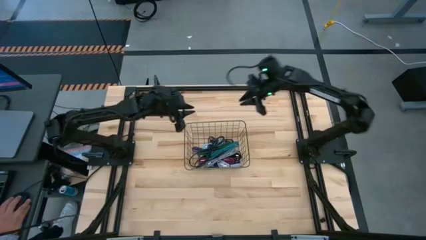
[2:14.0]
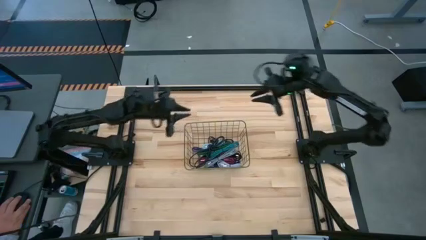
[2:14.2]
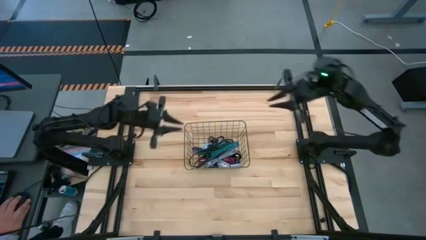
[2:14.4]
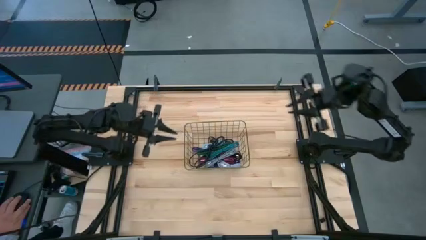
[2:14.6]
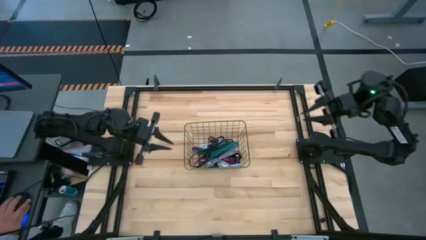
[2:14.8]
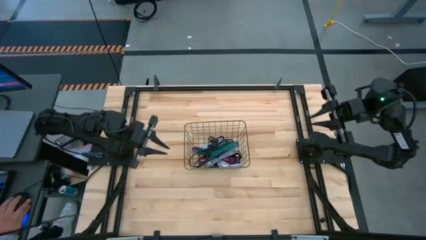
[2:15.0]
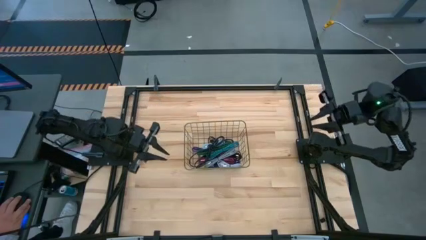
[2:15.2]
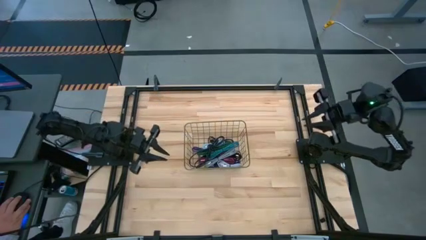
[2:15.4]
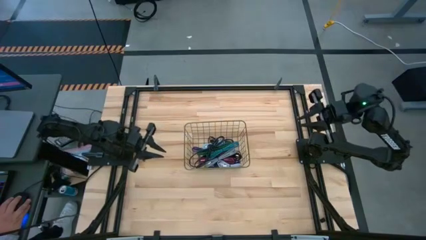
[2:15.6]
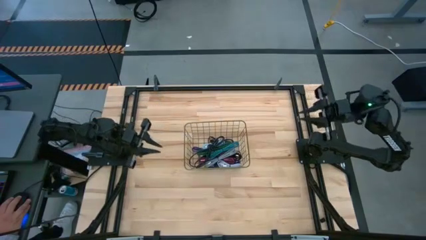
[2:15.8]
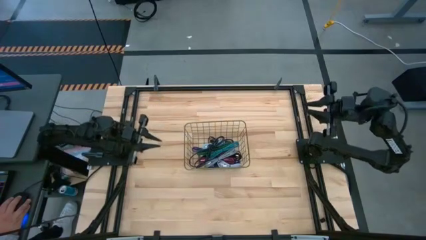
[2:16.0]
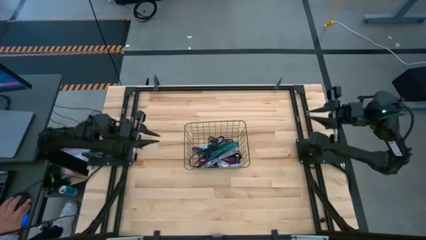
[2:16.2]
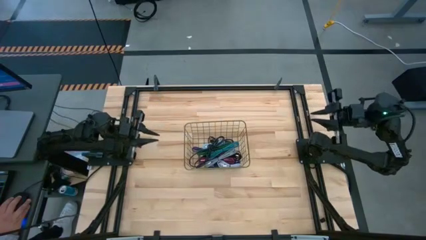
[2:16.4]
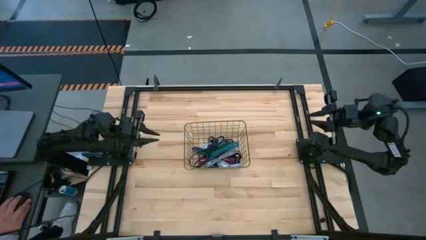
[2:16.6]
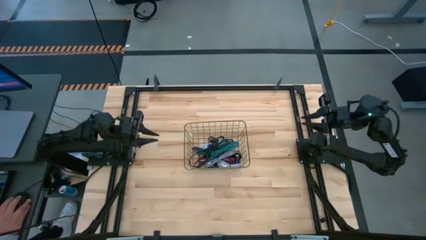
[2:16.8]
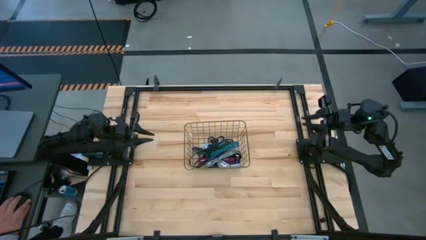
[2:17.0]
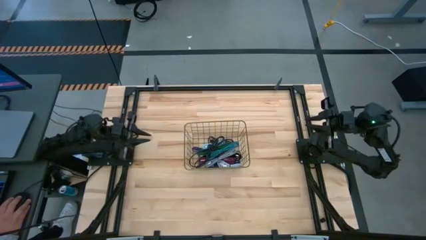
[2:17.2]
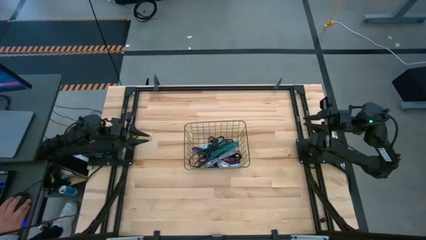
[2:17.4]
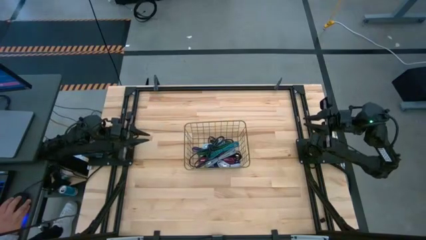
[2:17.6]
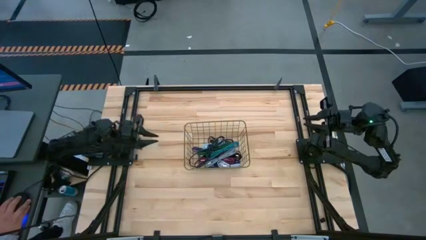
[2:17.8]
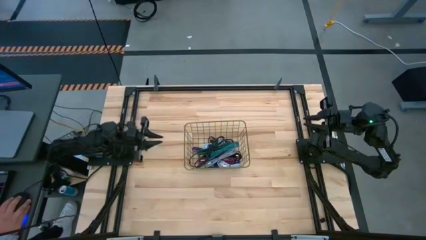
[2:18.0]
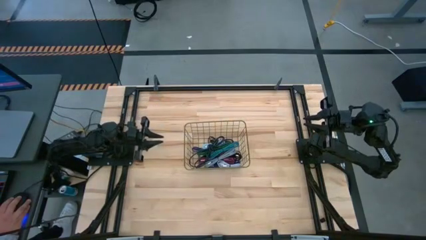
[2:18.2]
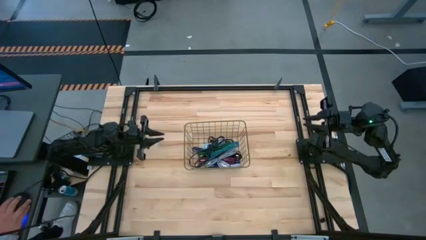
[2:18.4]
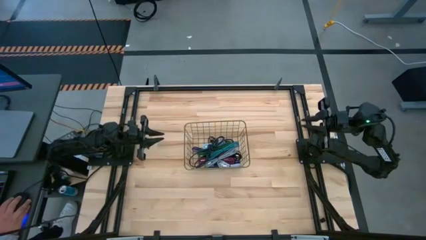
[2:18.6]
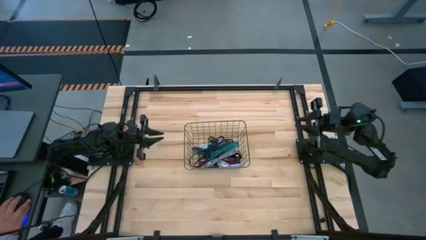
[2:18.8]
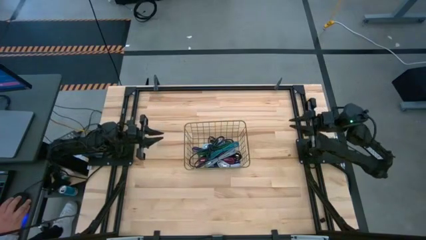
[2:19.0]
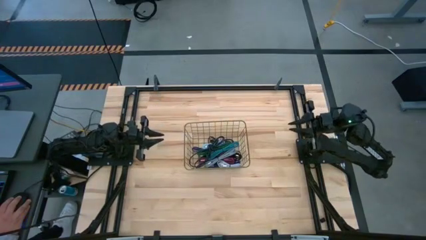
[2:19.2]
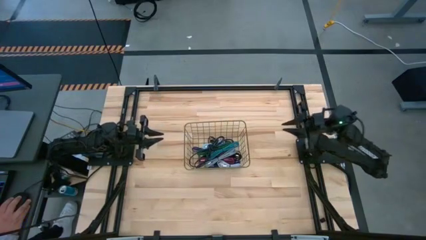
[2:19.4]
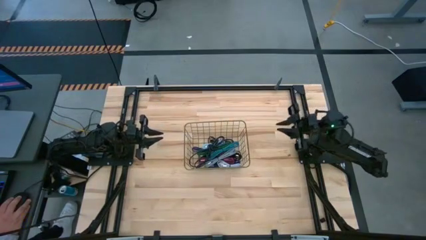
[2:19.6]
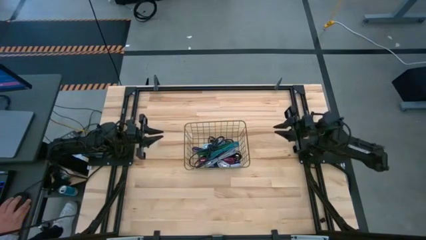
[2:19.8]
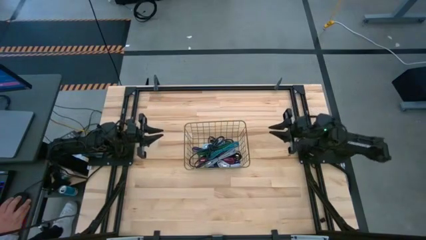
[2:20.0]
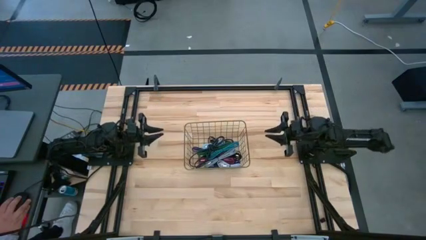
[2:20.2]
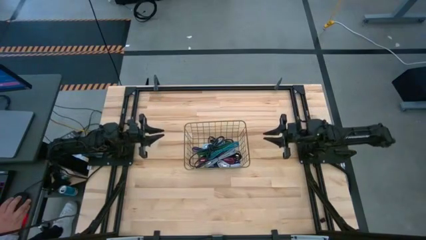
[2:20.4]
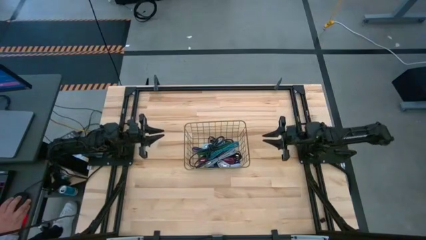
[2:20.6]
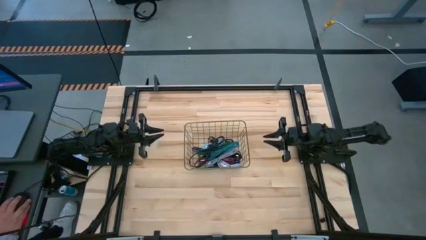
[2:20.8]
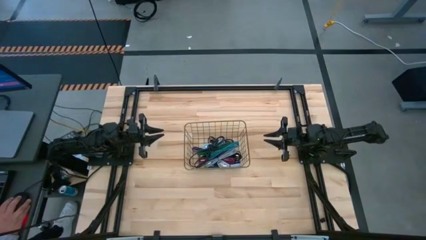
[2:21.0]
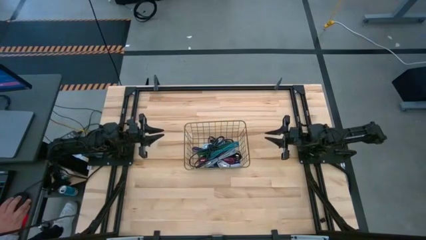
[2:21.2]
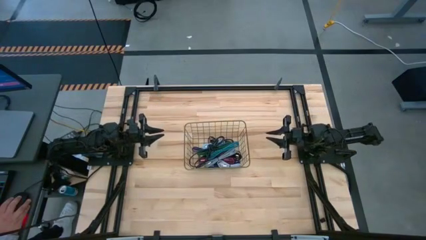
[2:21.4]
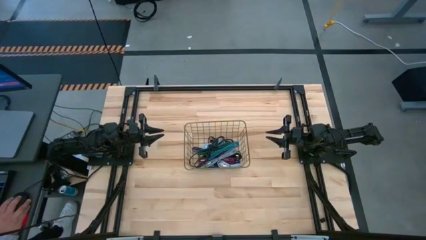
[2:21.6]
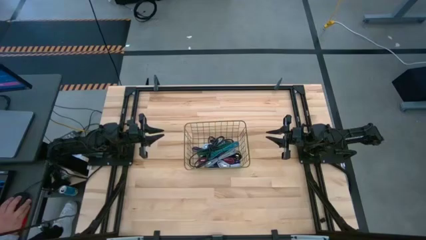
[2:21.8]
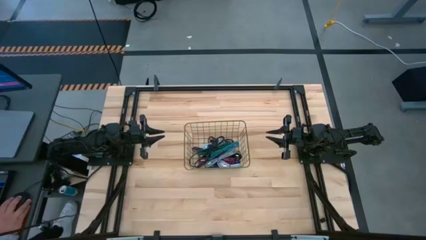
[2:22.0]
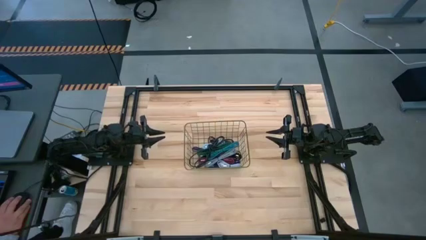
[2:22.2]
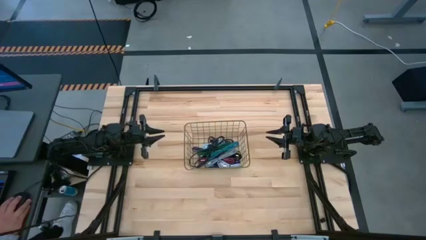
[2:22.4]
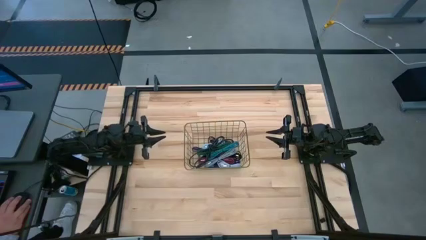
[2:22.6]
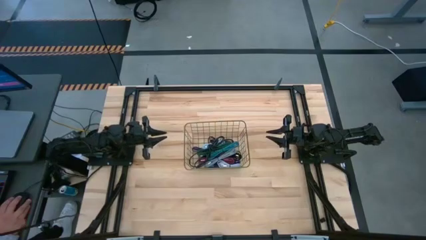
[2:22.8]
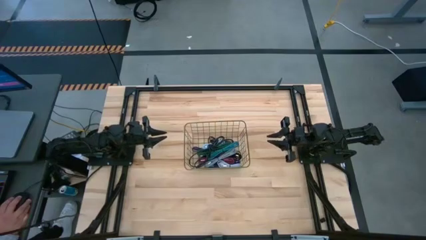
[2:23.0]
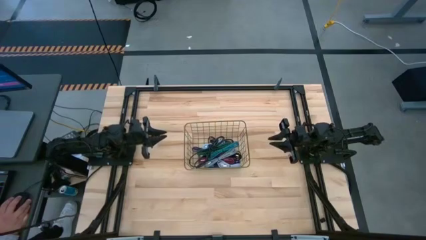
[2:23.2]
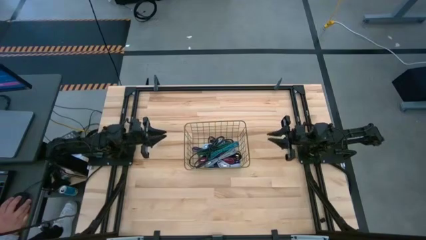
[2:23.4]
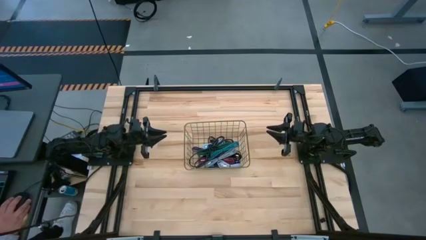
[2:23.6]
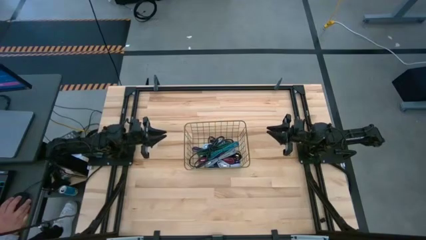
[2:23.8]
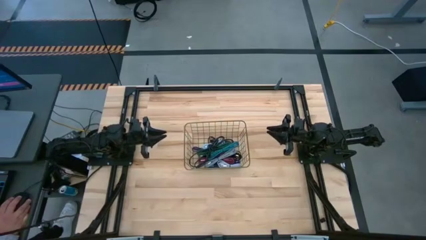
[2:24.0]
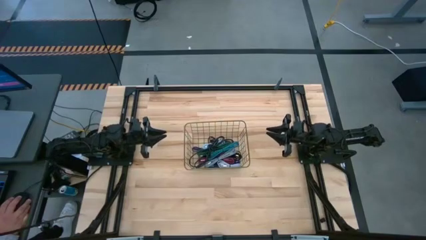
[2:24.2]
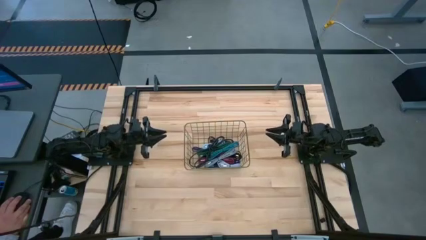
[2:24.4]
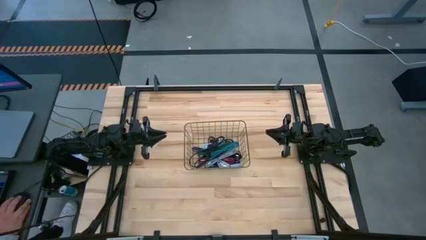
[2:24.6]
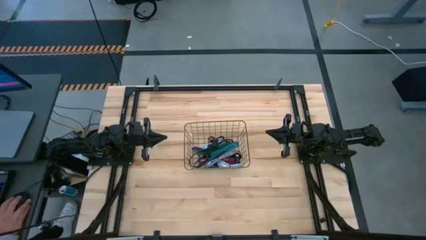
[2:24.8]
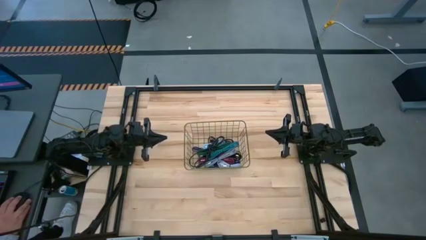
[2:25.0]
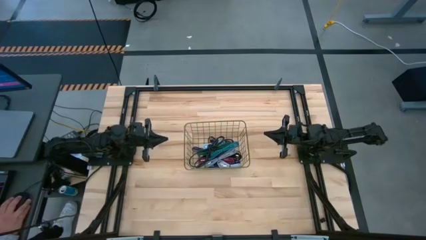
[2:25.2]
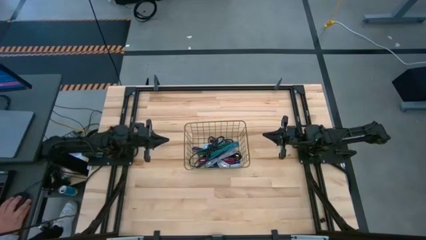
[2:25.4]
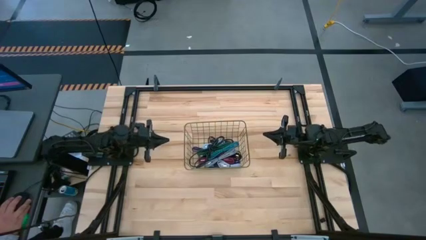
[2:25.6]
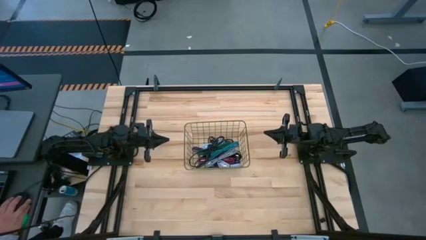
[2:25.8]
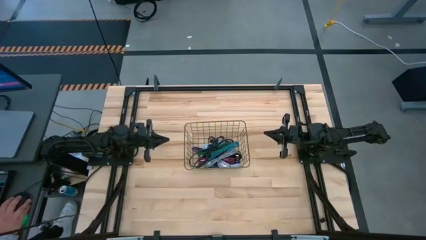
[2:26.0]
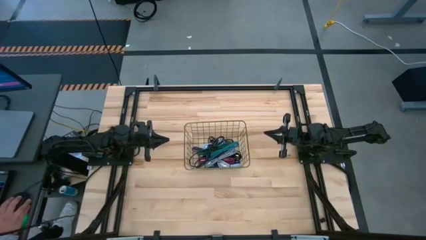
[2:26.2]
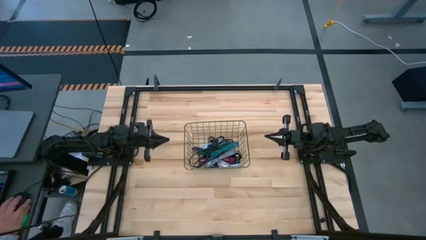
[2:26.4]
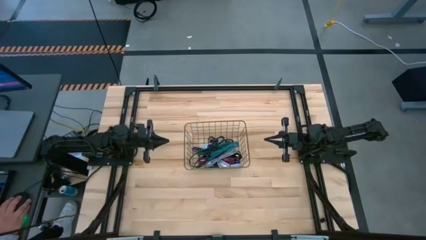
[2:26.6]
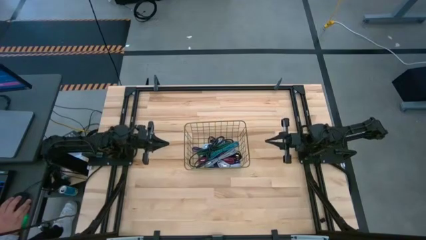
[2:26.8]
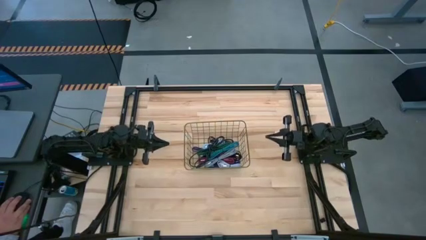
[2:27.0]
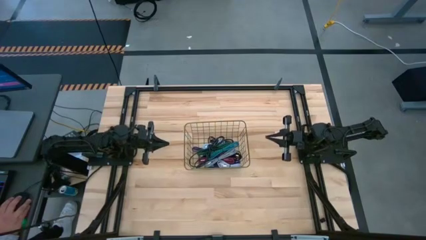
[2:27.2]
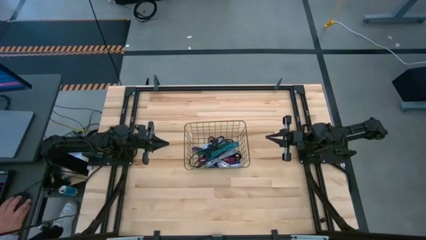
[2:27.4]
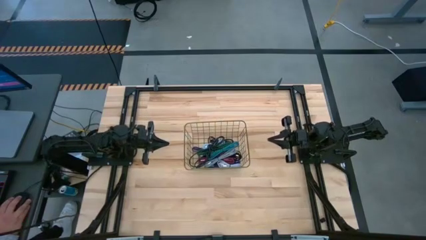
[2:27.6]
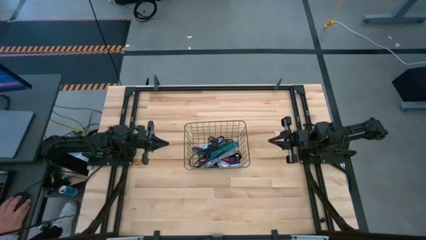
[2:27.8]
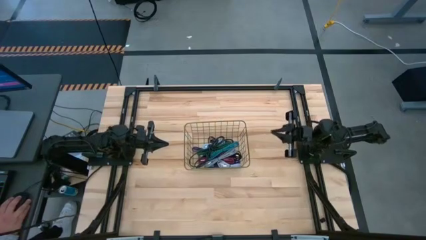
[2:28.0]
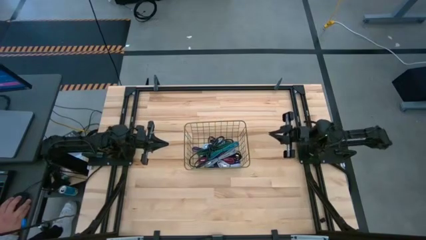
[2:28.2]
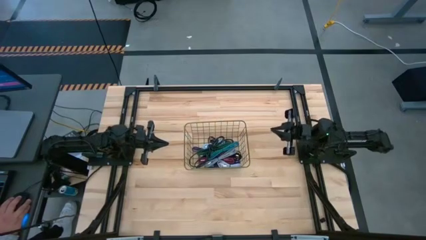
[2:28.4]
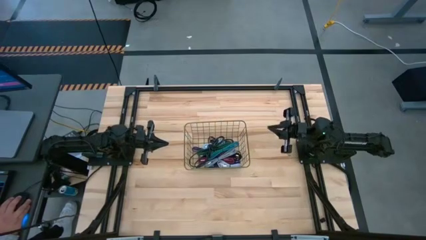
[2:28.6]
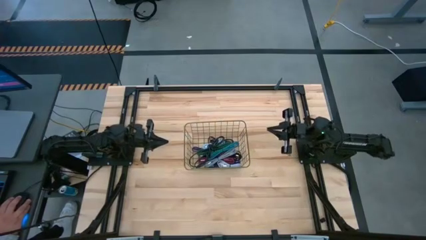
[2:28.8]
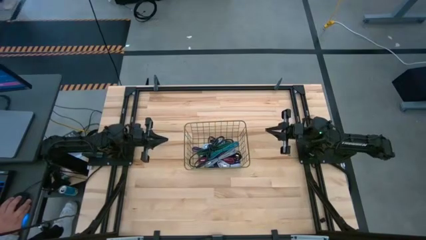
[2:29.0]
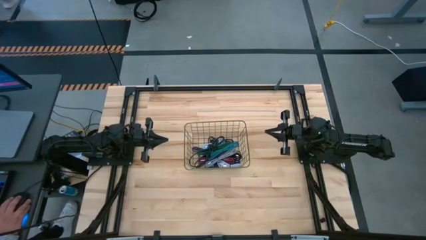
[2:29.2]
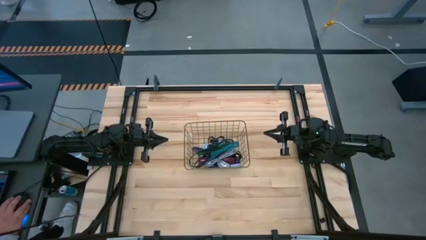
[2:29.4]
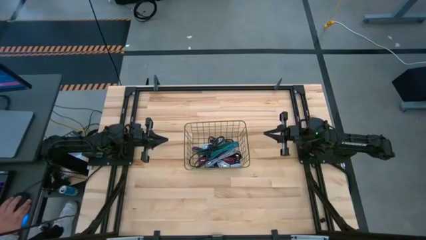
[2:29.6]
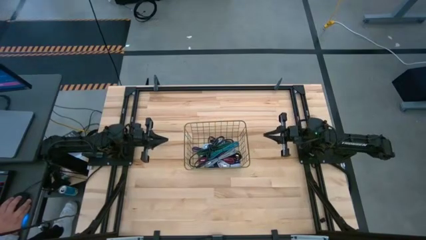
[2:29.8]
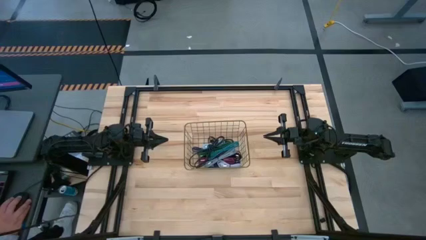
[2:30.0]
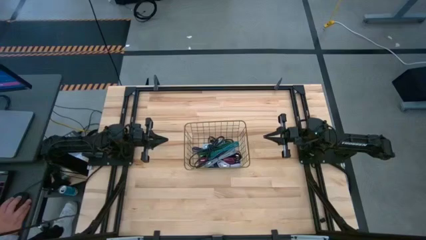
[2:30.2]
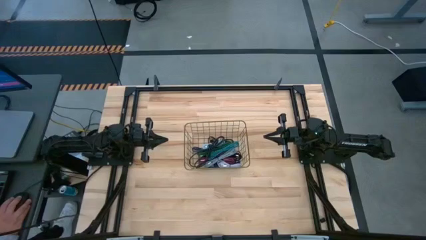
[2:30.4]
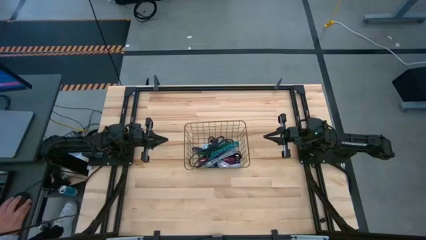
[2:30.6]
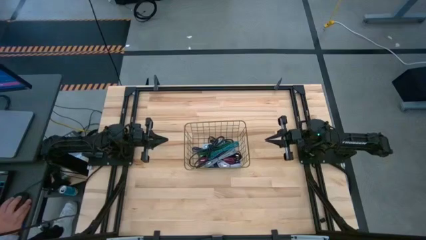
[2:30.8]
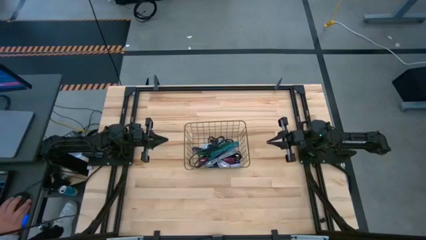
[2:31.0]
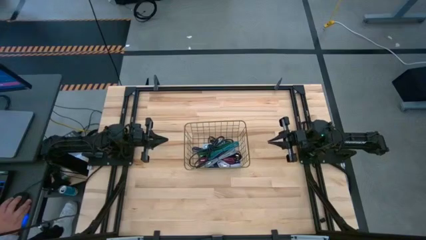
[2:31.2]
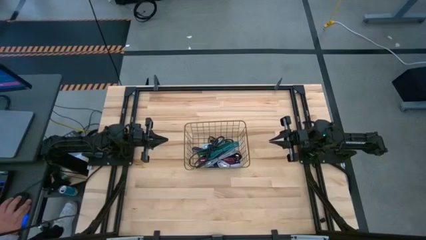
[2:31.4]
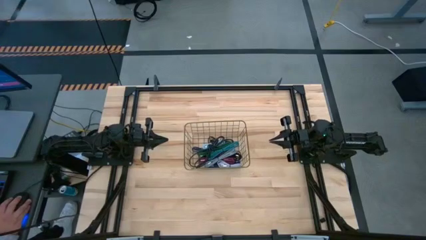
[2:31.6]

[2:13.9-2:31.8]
Task: Pick and place USB-C Cables
Return to Home Position
